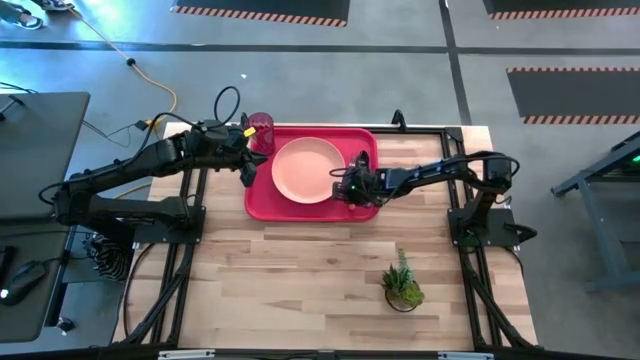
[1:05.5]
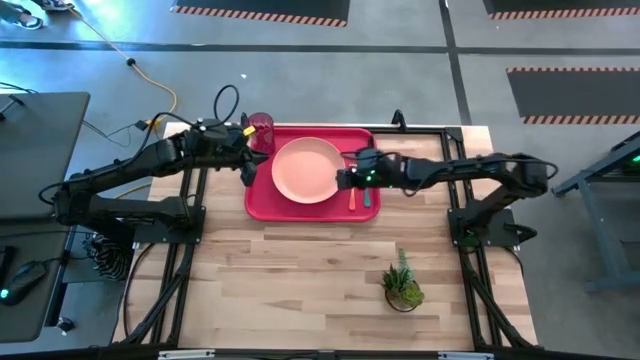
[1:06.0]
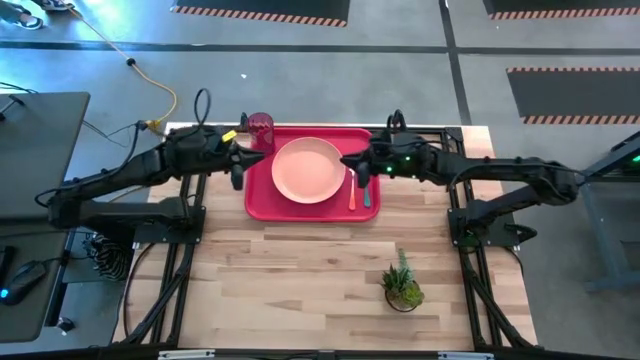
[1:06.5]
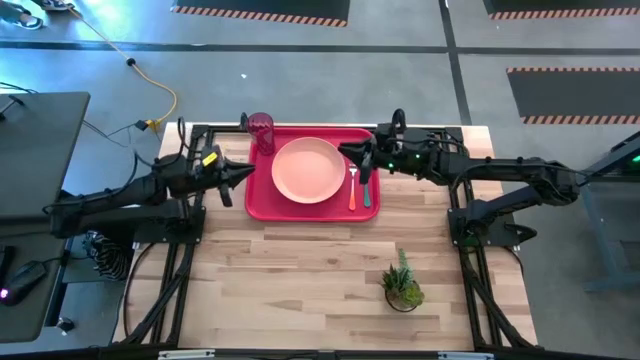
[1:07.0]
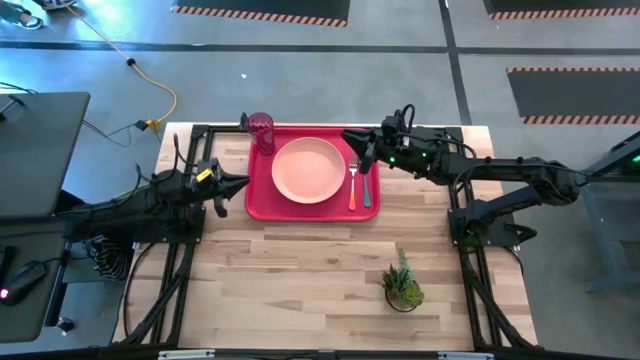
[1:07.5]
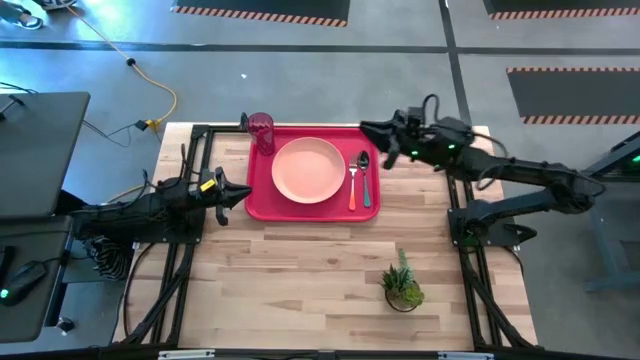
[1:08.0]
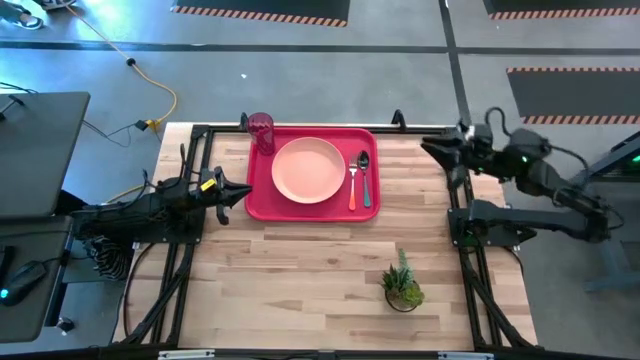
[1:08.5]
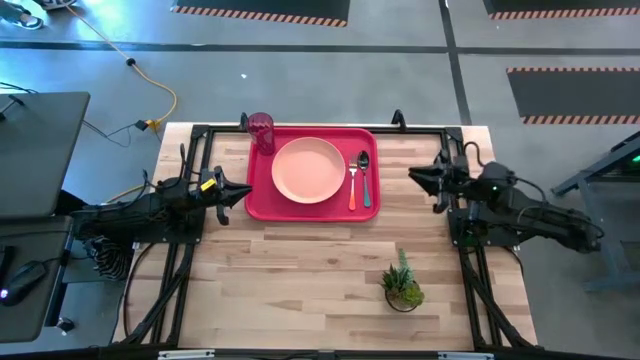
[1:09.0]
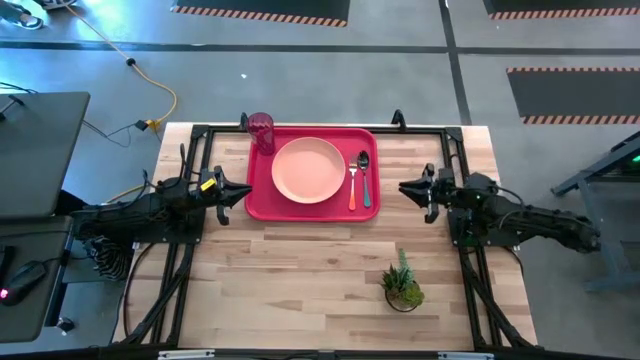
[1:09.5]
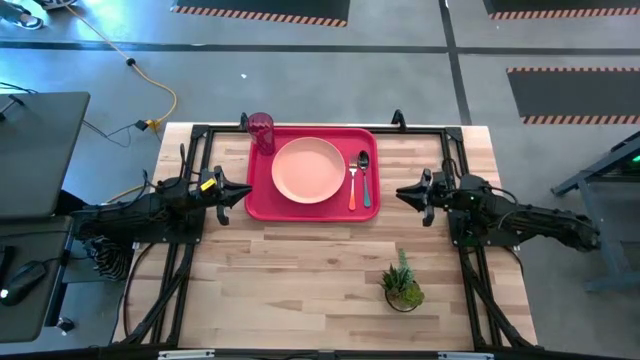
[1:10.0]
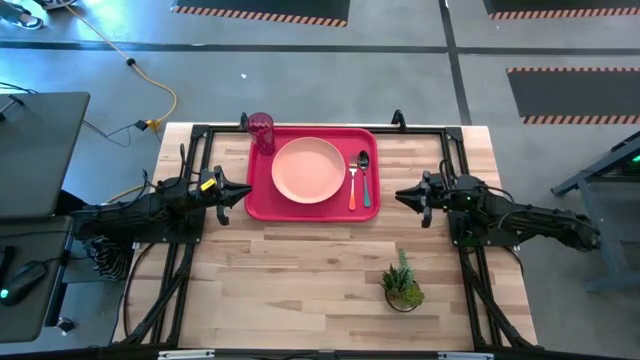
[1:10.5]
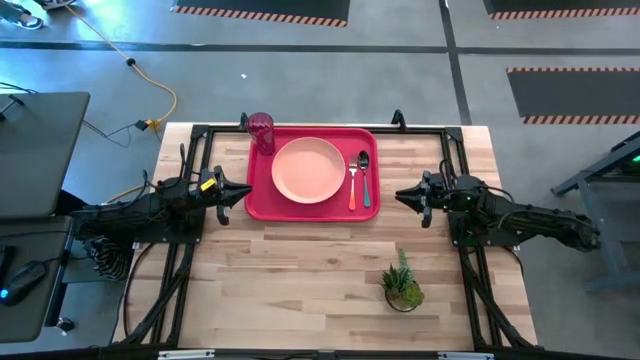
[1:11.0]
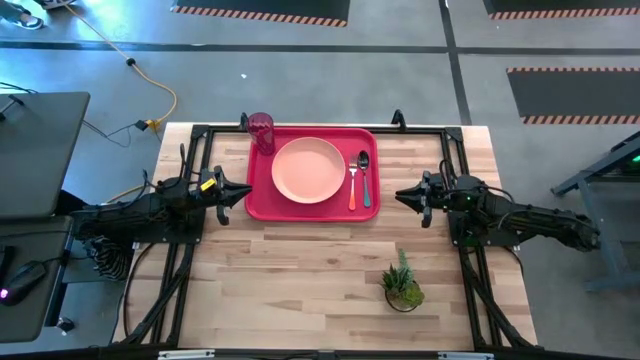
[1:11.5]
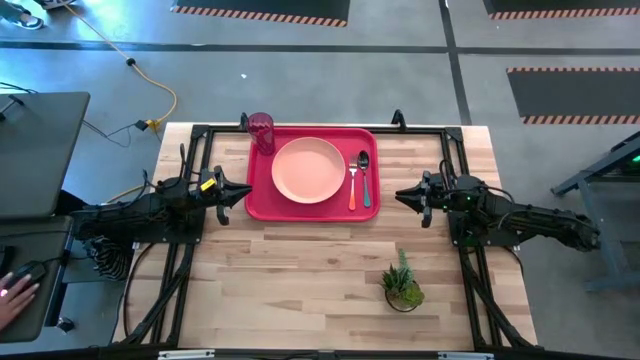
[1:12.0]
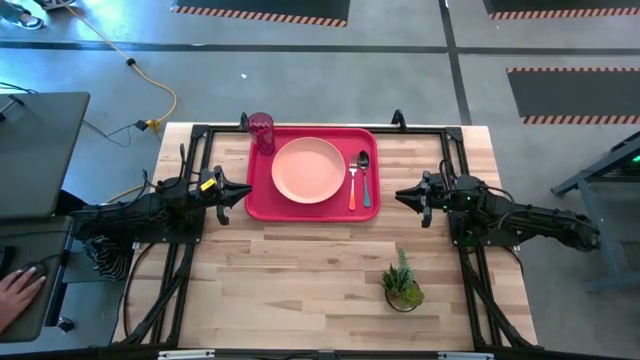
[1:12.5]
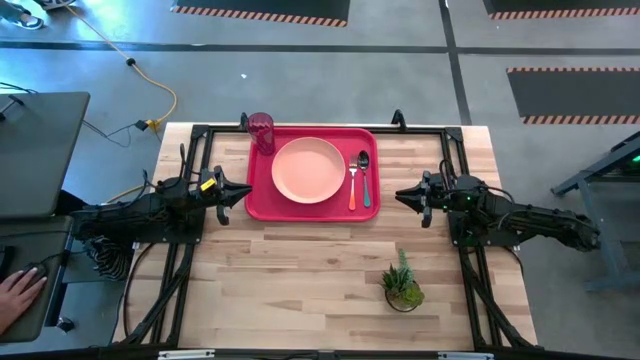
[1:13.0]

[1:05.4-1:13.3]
Task: Pick and place plate/cup/fork/spoon on tray
Return to Home Position

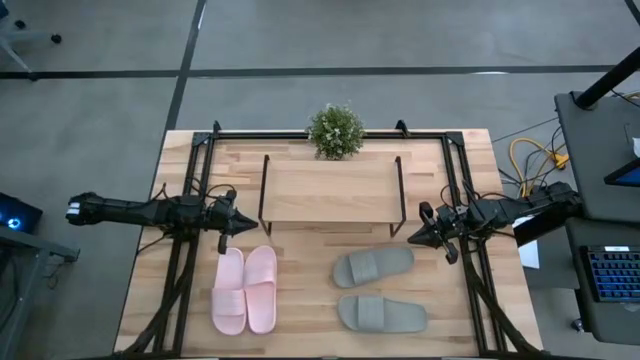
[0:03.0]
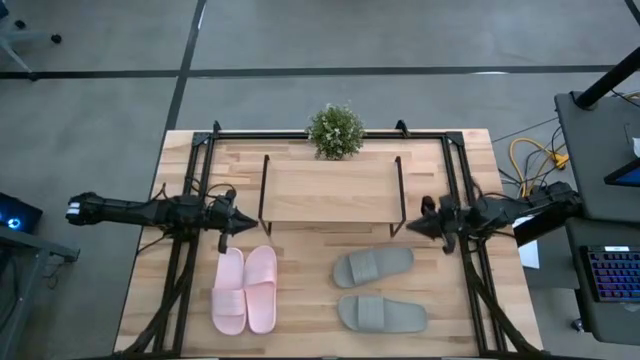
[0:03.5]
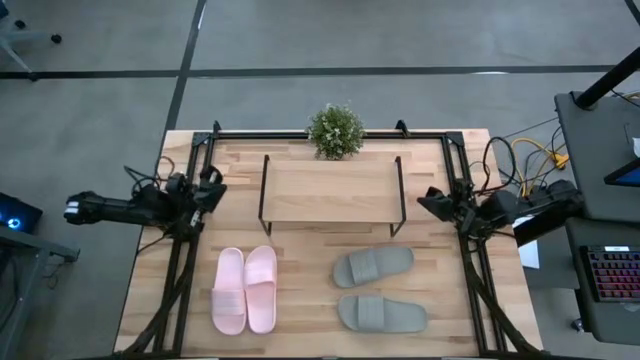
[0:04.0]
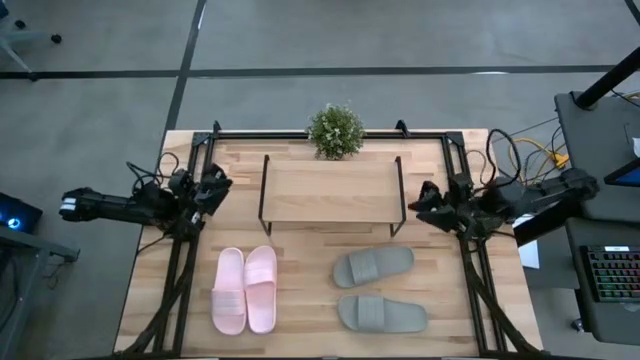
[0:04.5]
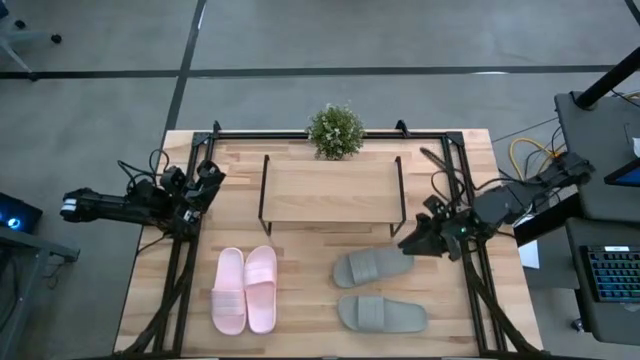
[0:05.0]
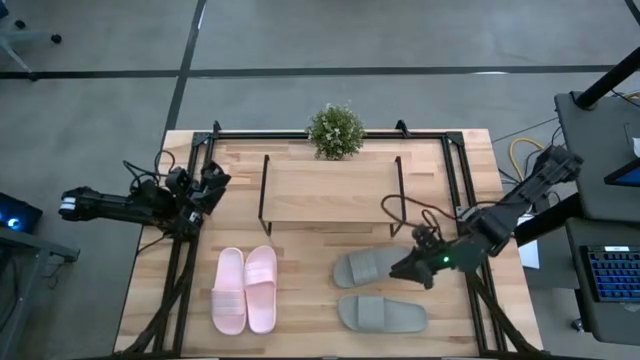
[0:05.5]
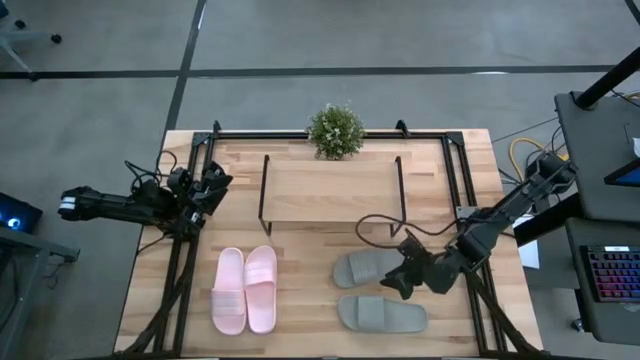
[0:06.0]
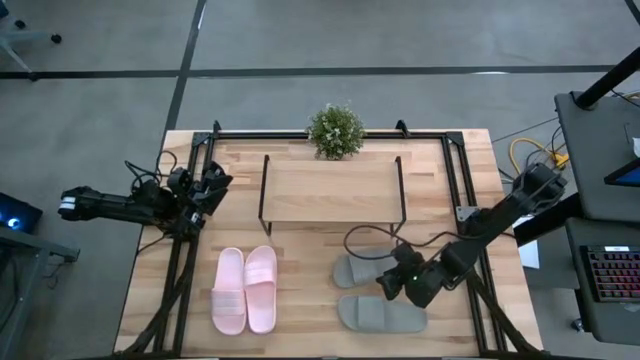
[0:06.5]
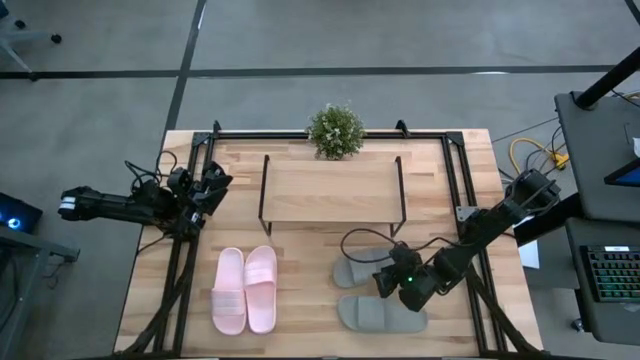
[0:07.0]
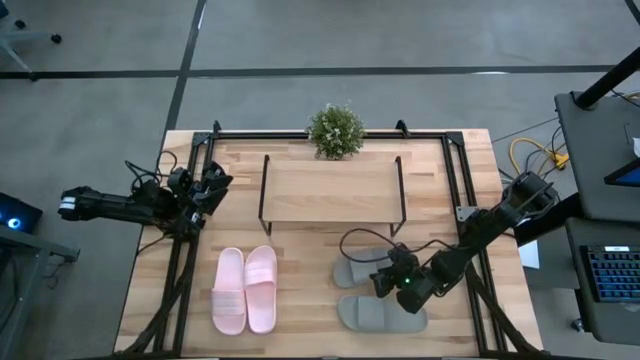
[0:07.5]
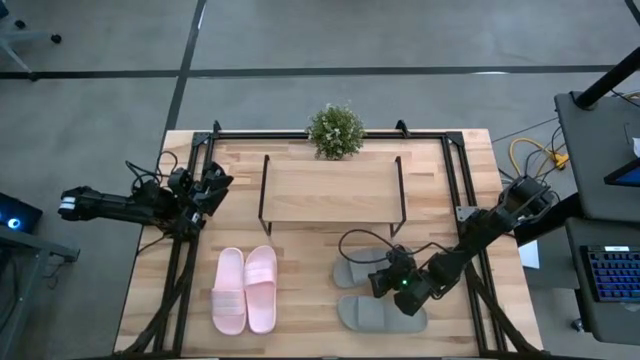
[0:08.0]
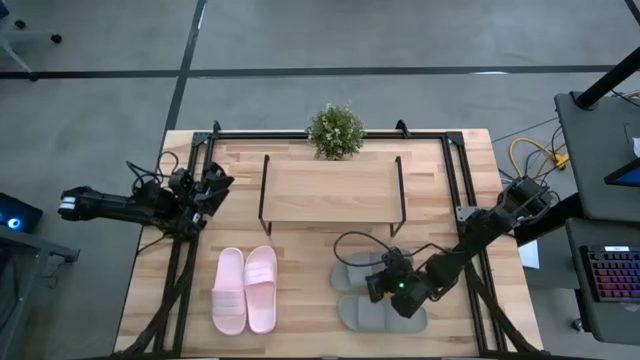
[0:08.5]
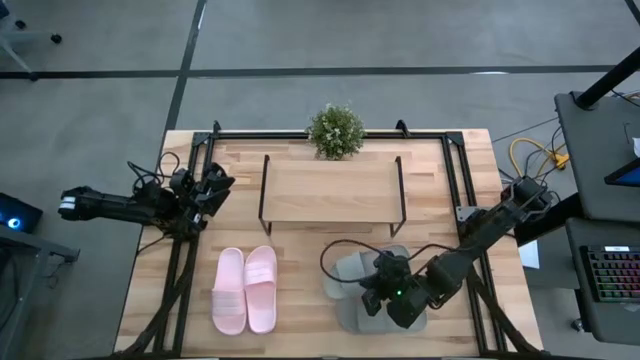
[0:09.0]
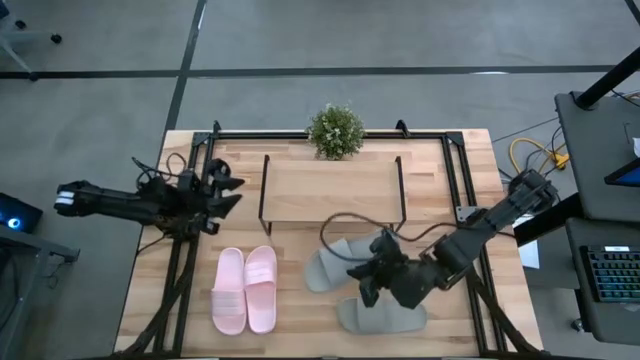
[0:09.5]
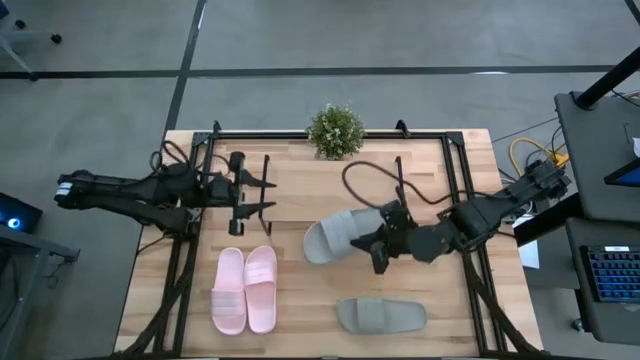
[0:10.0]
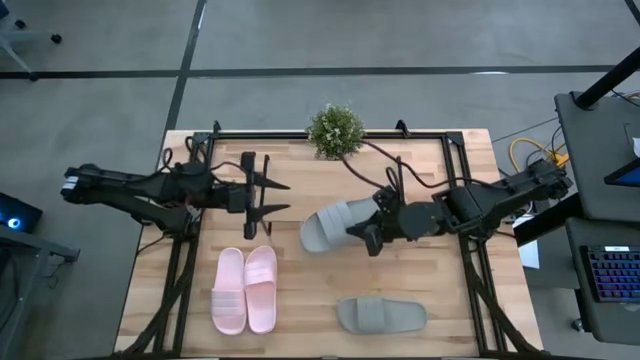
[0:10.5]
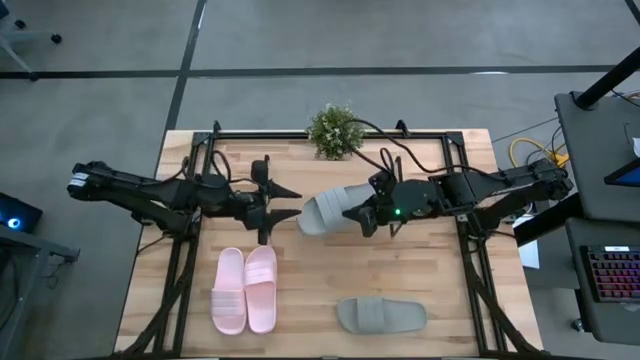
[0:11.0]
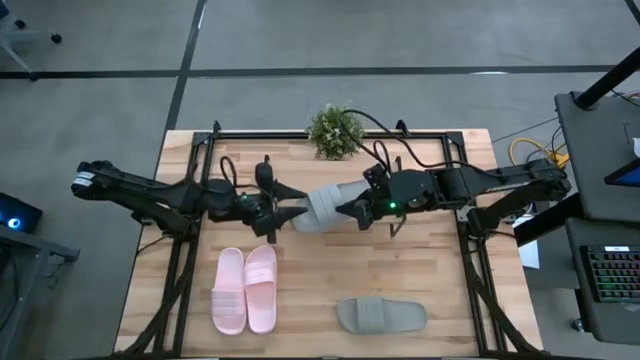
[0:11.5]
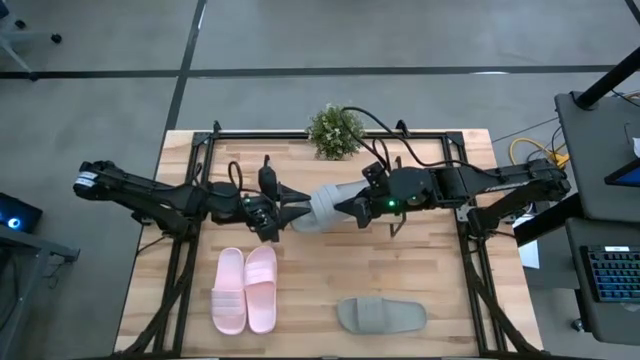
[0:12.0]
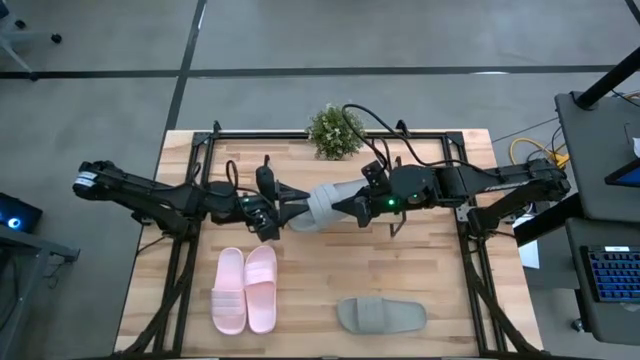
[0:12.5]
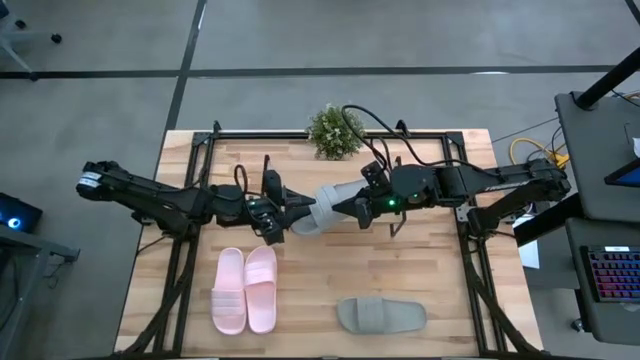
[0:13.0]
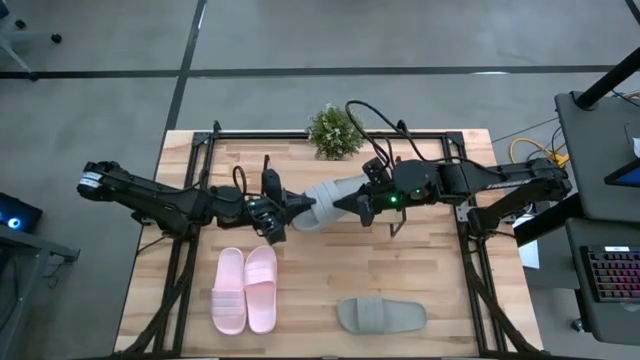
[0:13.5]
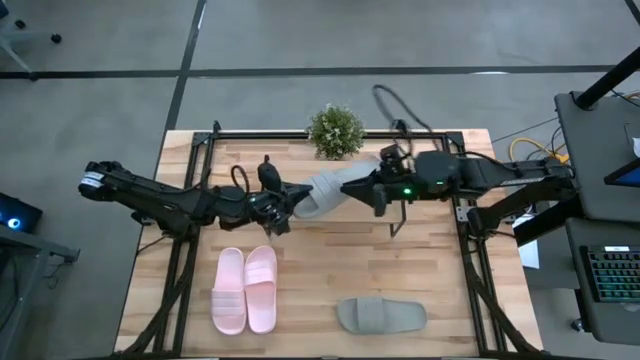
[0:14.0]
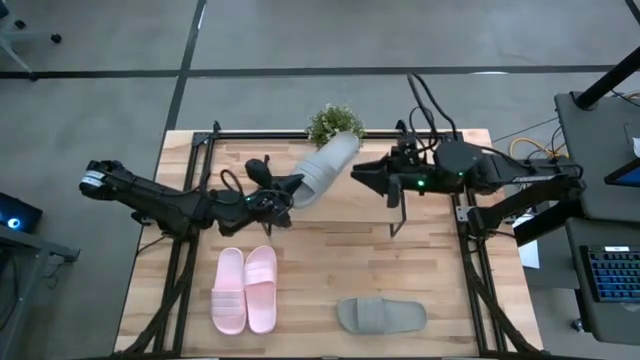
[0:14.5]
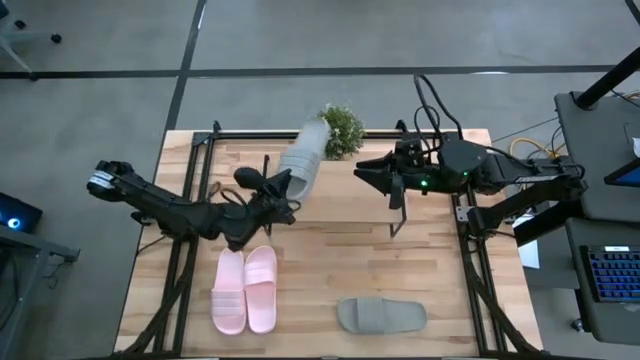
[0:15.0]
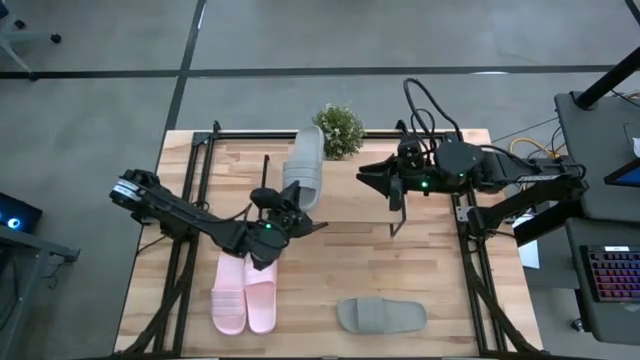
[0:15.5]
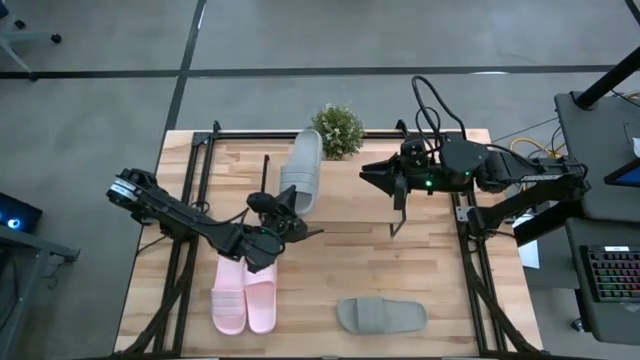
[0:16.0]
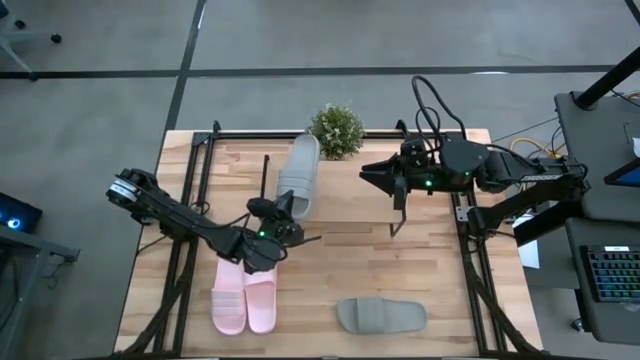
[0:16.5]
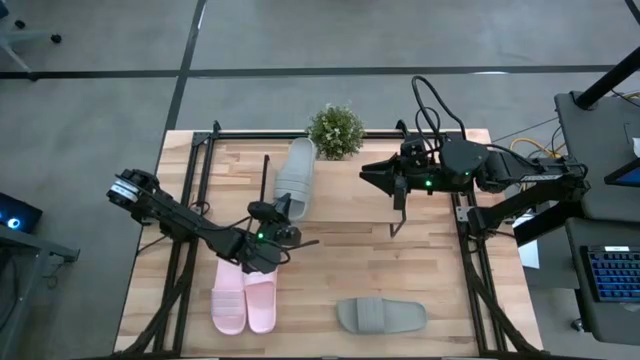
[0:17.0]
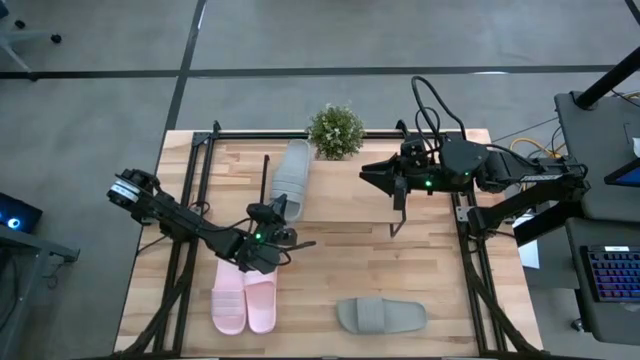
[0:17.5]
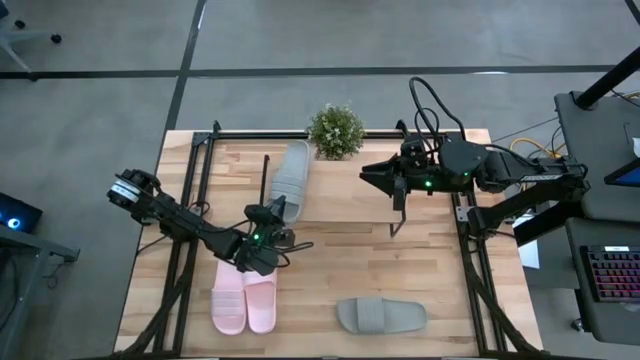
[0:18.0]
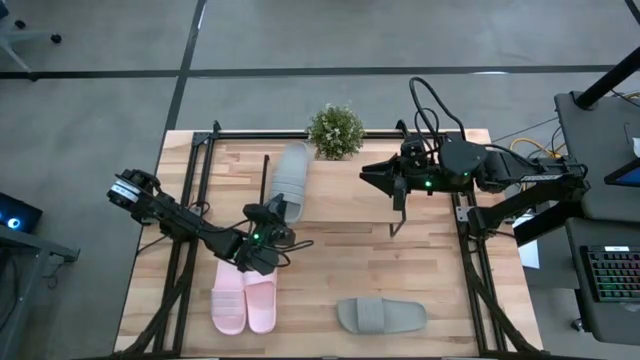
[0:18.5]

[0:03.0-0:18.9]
Task: Pick and place slides into the shelf
Put the right gray slipper on the shelf
